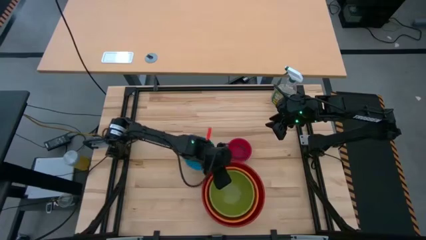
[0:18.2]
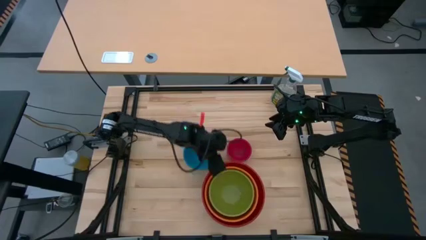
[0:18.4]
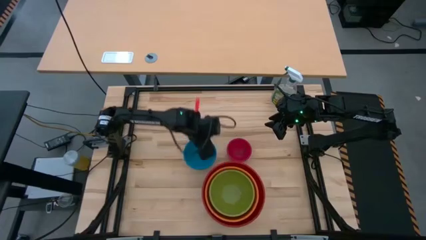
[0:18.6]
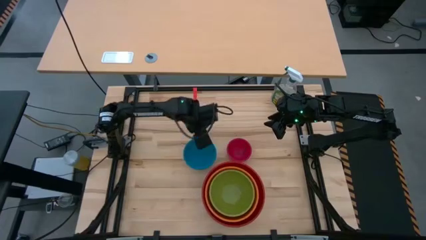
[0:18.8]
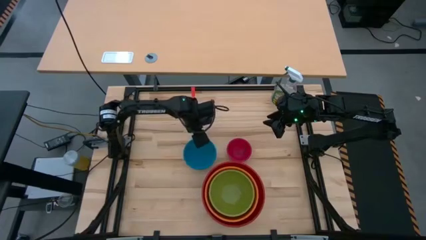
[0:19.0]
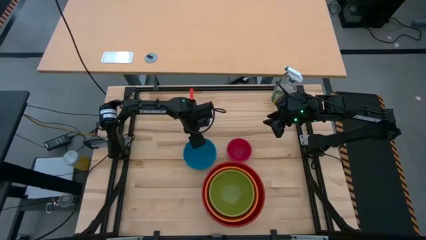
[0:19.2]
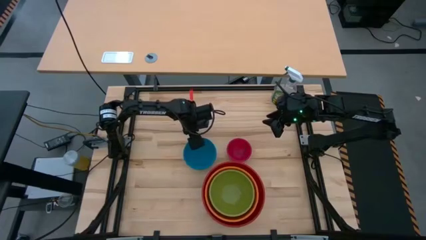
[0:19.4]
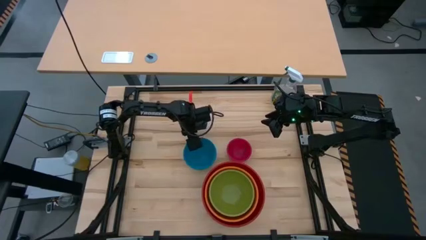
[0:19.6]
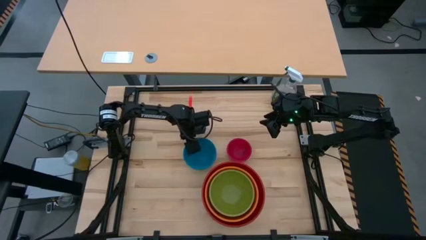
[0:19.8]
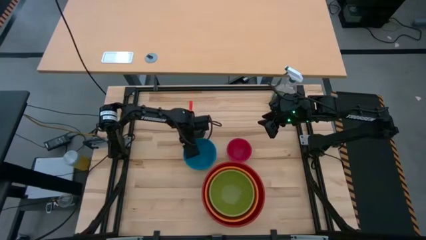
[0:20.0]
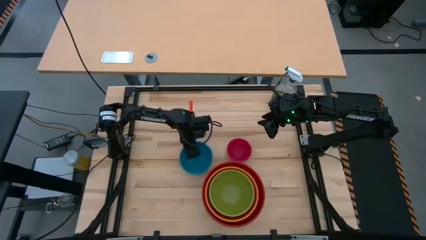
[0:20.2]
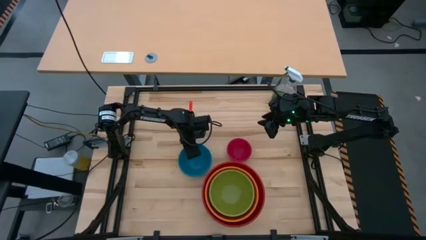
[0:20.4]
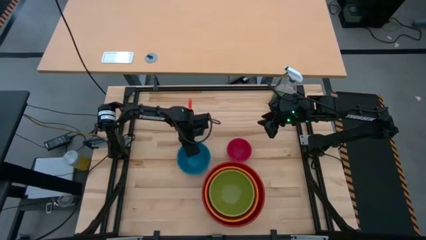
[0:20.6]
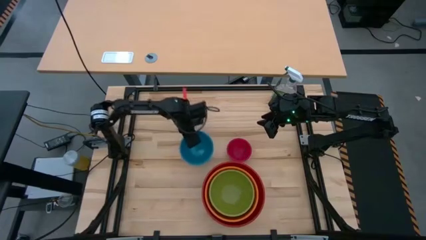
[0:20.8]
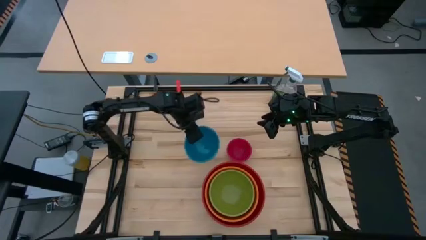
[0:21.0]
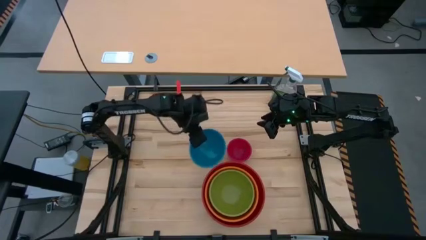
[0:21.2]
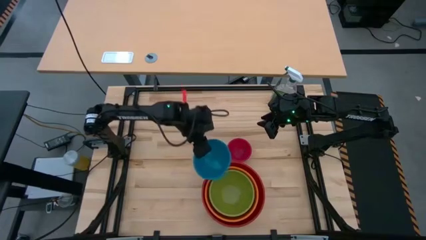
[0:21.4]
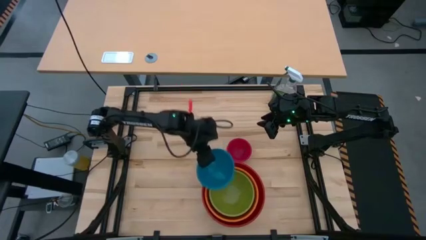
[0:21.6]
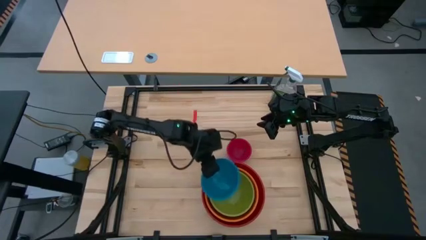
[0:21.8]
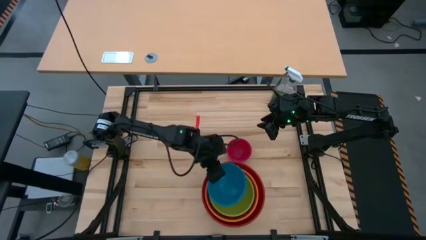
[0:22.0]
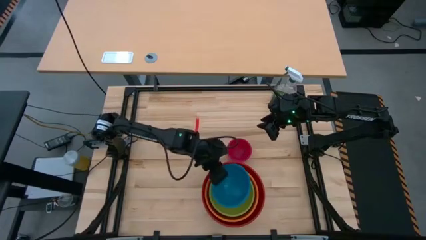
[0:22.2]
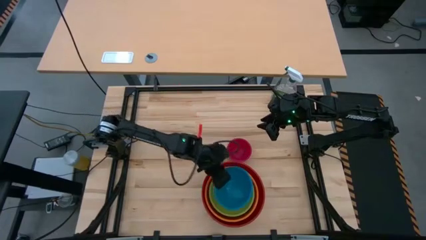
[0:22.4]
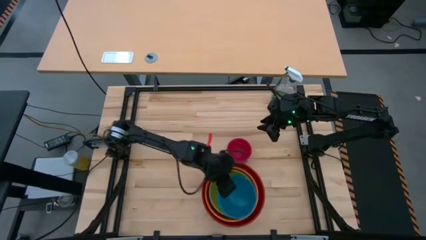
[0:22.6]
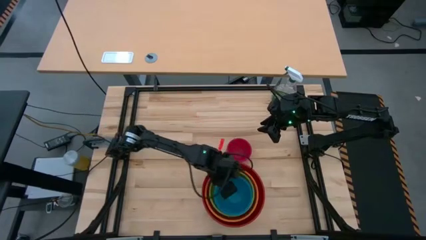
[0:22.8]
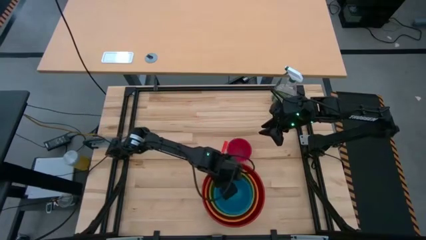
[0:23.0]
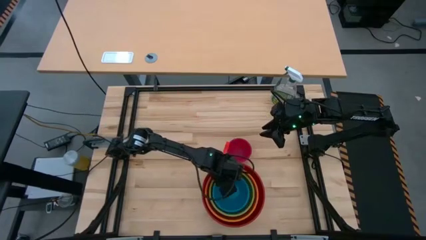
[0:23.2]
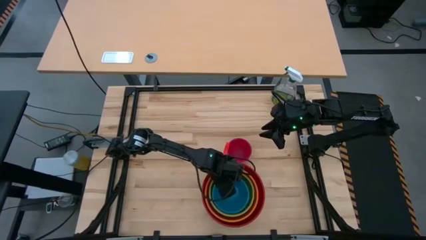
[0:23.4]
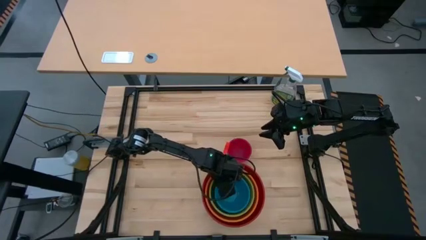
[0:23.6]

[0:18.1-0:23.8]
Stack the blue bowl on top of the green bowl

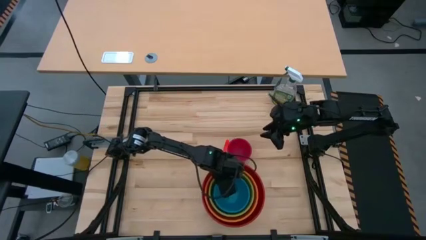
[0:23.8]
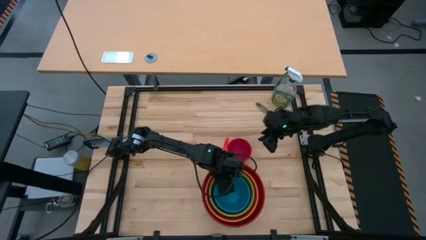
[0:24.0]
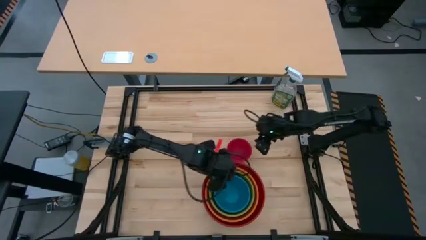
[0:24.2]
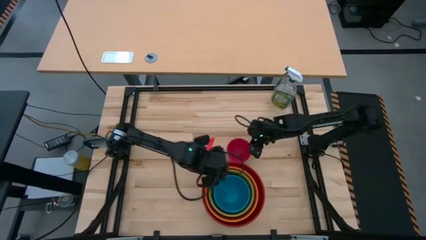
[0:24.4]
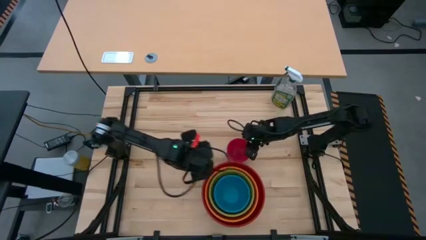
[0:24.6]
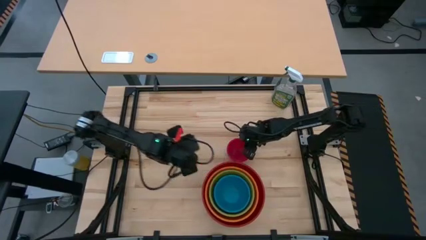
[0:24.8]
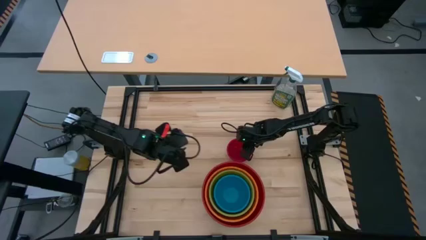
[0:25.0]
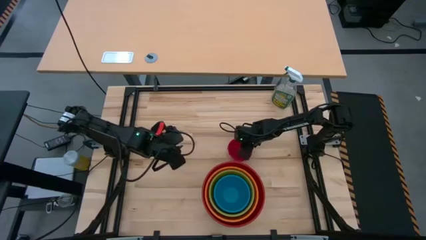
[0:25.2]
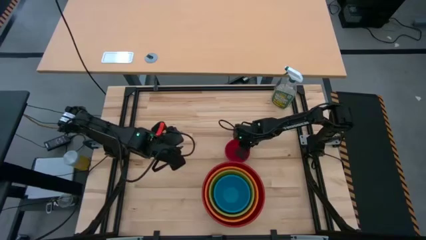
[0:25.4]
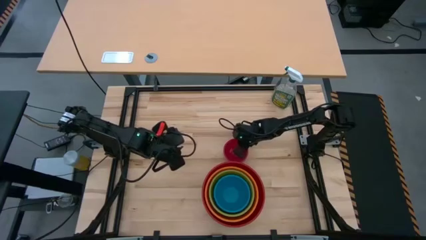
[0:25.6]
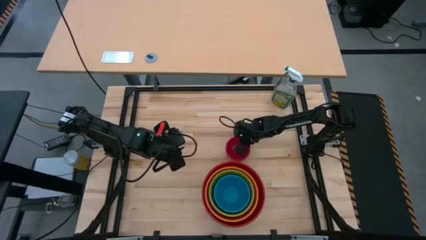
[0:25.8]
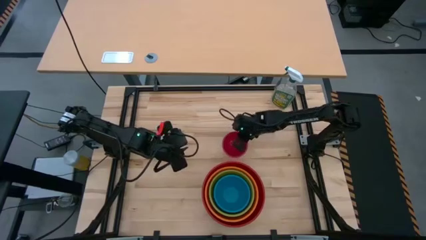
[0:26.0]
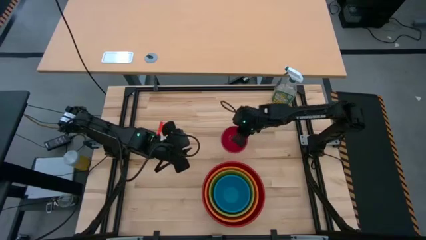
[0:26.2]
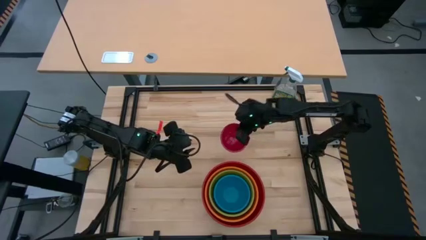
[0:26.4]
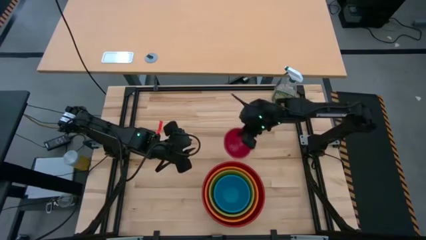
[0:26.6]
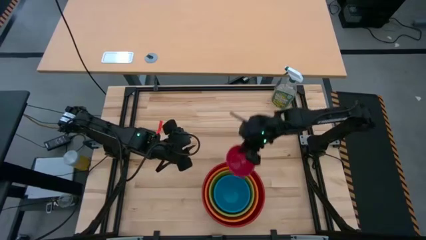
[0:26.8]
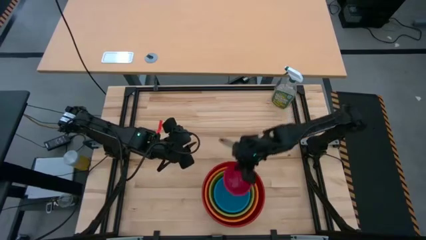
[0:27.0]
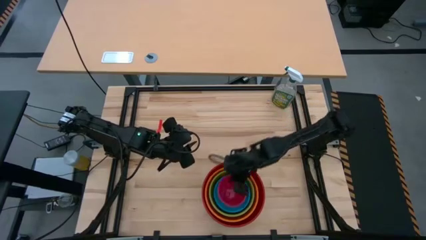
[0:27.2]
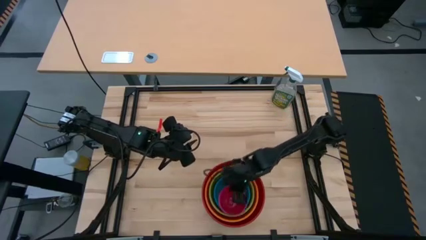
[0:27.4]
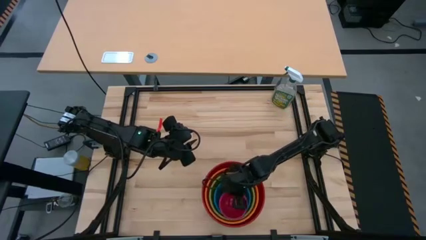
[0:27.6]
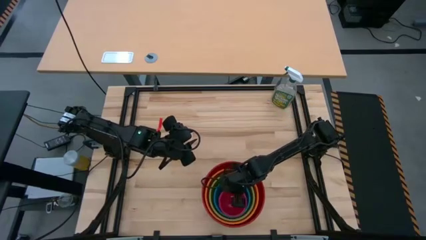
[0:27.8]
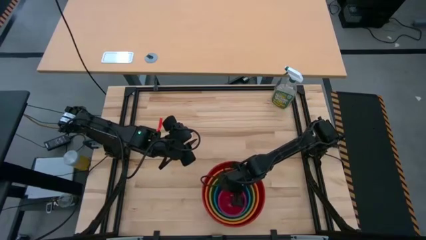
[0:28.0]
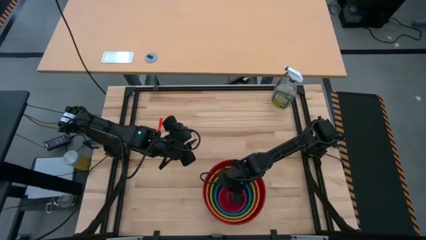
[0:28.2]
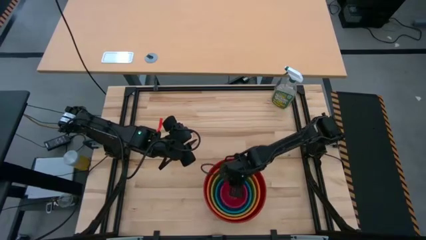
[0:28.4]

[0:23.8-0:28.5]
Stack the small red bowl on top of the blue bowl

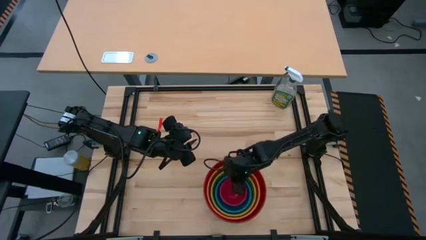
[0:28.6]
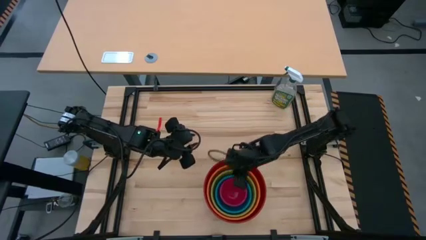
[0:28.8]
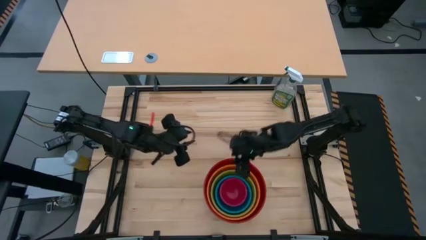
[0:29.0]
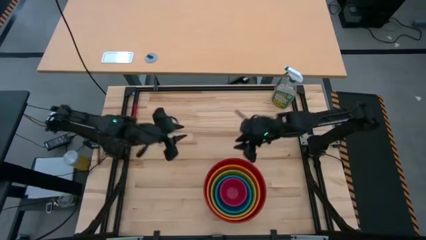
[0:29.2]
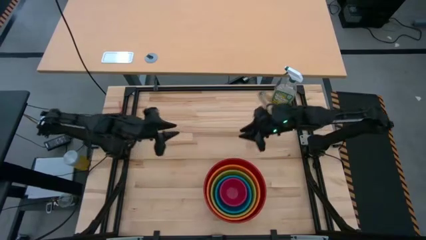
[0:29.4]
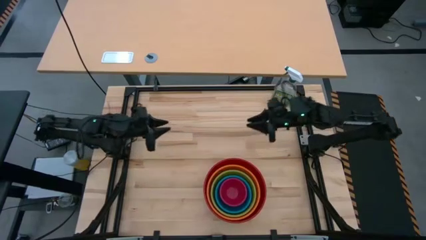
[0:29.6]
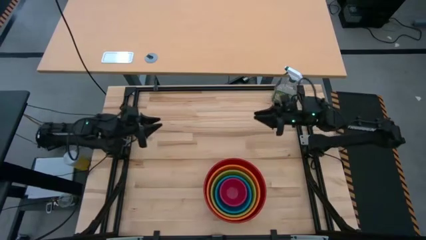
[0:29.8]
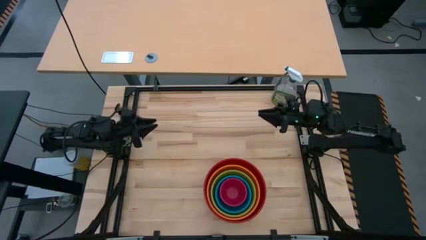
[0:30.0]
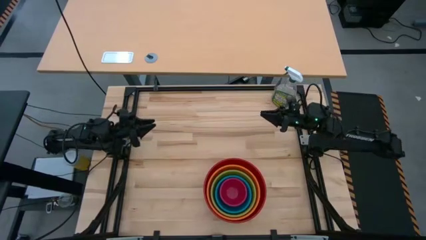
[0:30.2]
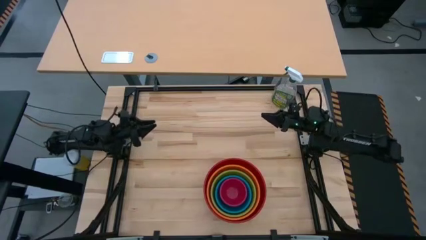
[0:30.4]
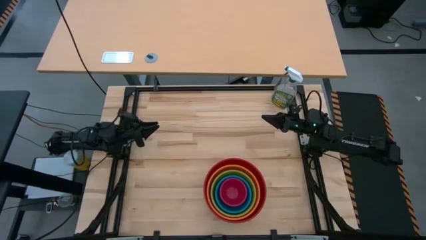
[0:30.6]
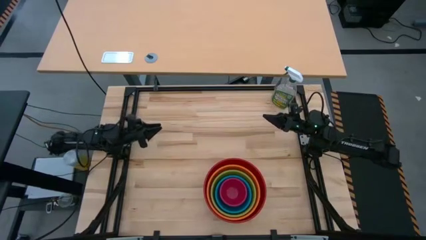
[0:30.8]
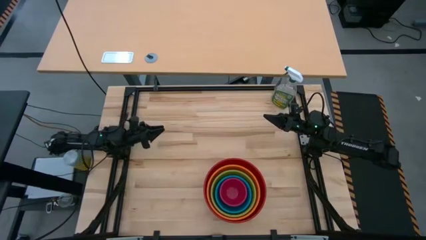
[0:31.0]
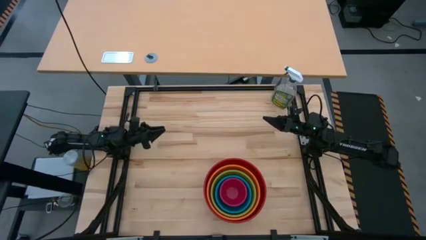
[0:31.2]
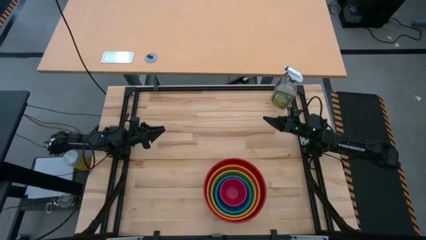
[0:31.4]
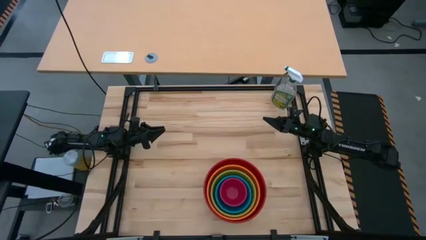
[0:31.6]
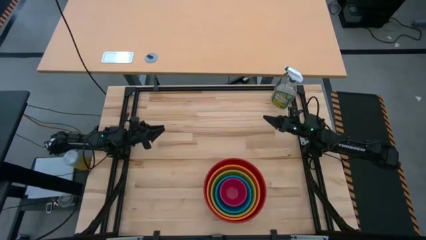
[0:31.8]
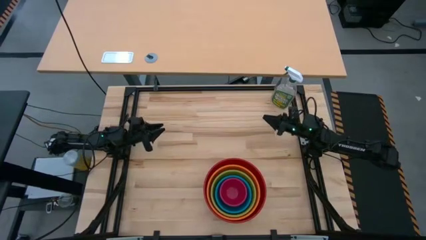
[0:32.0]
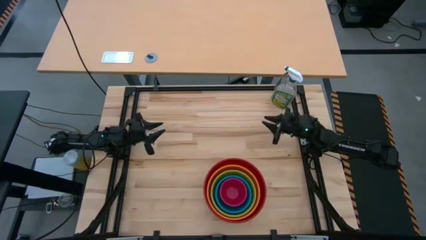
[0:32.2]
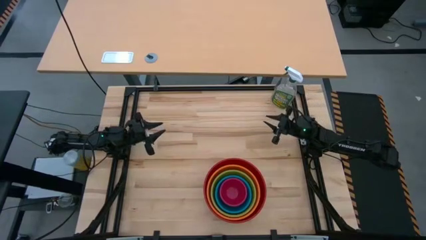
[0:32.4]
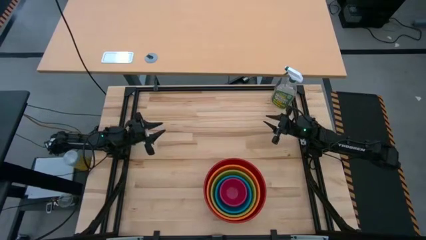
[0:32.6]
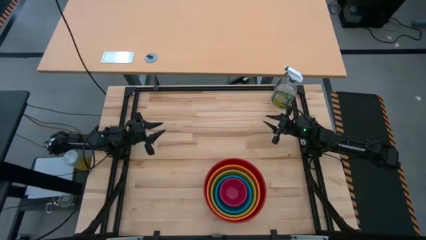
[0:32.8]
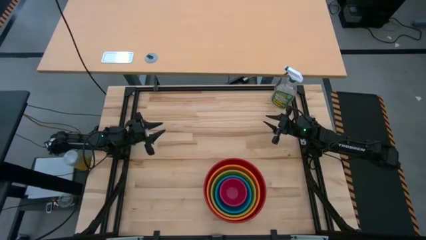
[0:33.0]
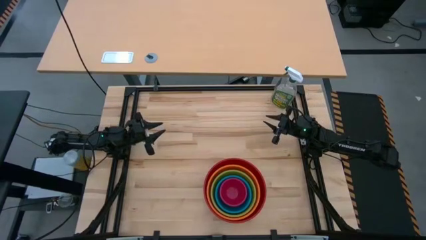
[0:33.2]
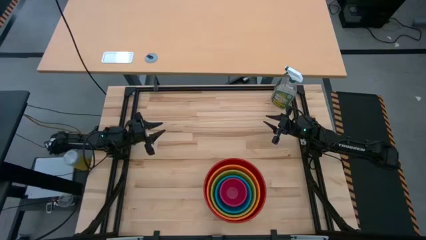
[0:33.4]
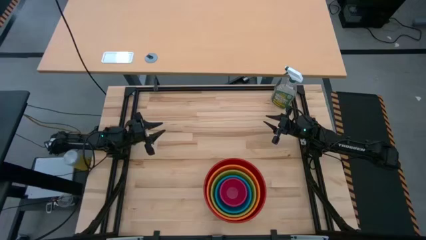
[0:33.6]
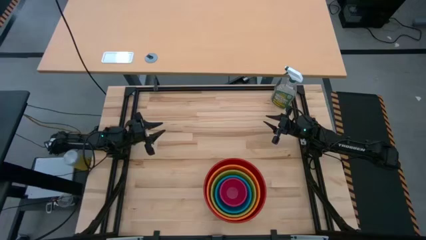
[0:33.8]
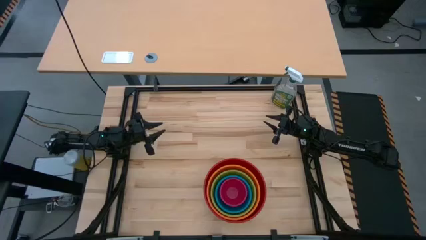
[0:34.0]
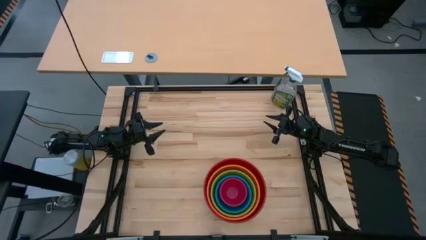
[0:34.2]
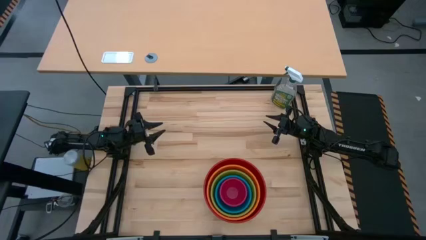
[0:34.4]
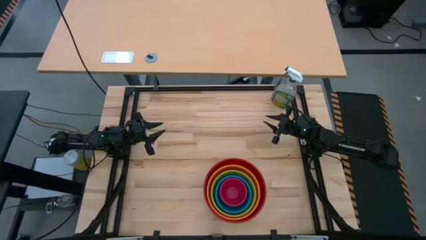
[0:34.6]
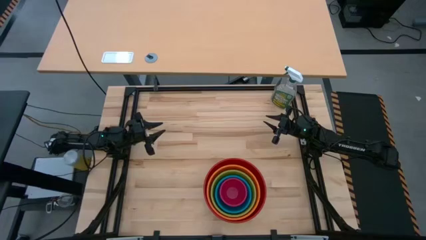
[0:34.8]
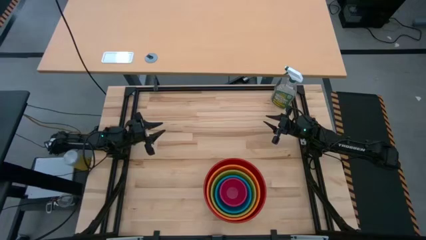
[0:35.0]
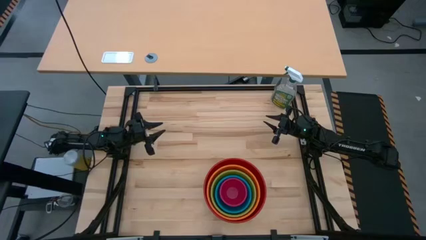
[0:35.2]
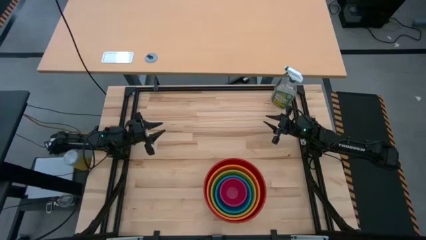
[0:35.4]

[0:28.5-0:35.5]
Return to Home Position
